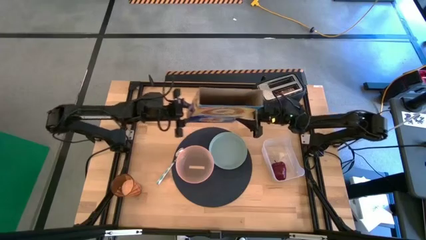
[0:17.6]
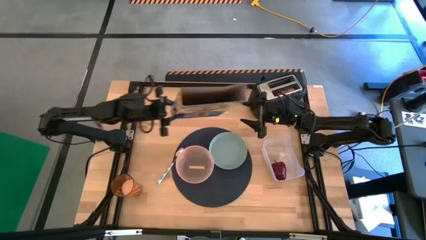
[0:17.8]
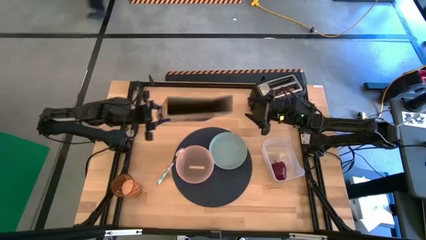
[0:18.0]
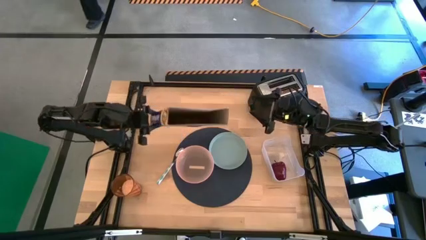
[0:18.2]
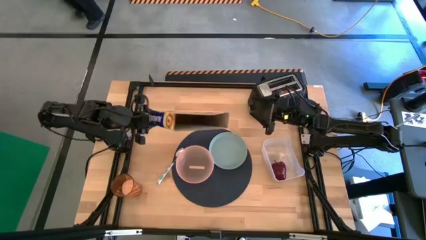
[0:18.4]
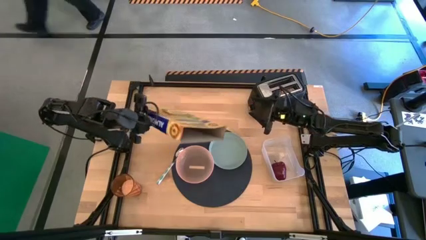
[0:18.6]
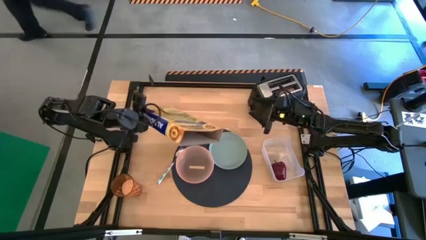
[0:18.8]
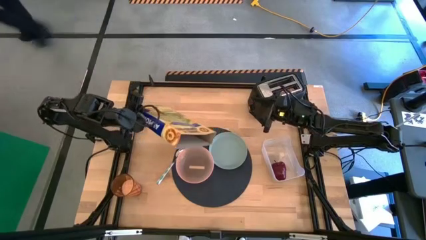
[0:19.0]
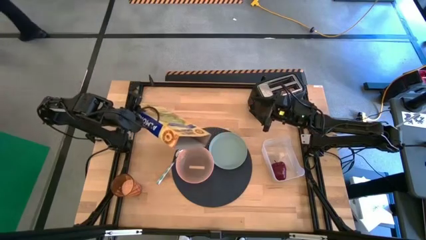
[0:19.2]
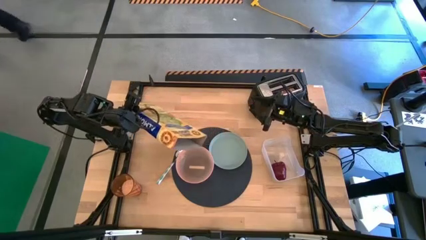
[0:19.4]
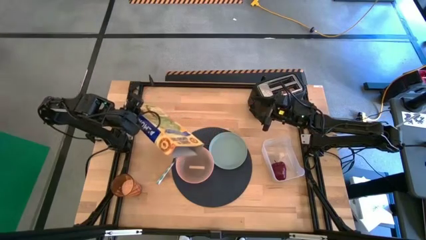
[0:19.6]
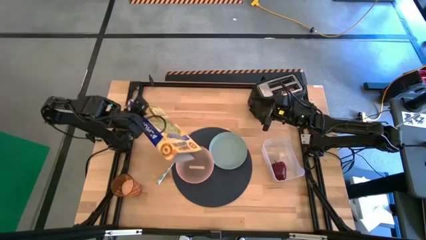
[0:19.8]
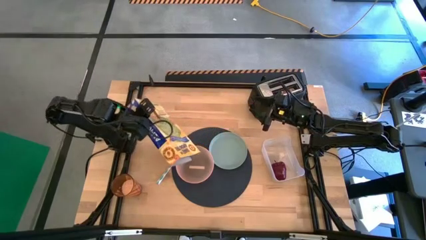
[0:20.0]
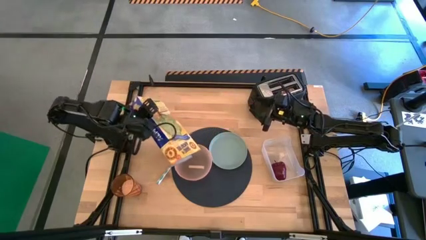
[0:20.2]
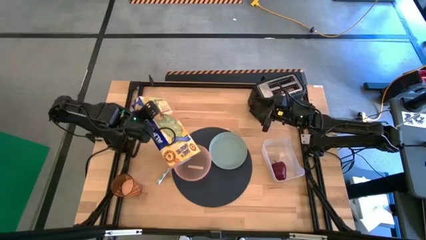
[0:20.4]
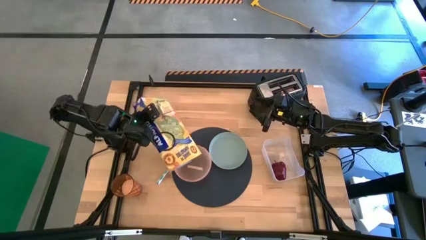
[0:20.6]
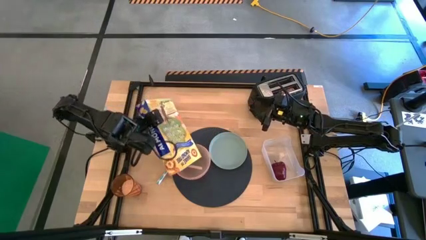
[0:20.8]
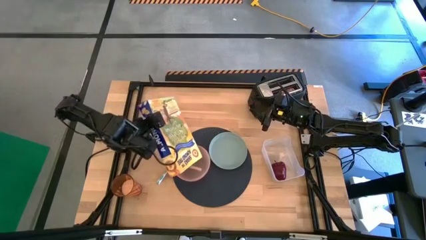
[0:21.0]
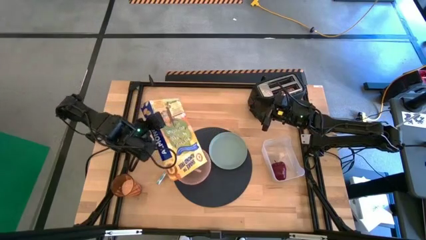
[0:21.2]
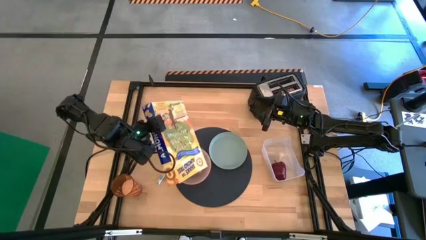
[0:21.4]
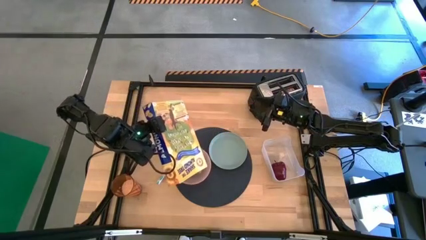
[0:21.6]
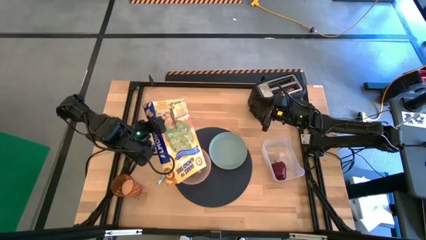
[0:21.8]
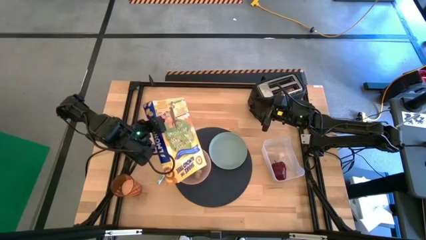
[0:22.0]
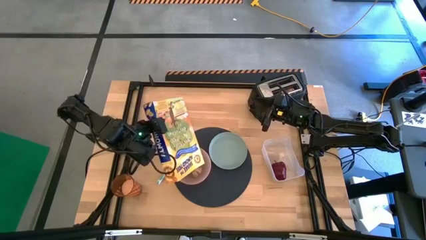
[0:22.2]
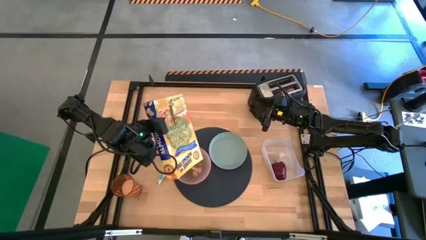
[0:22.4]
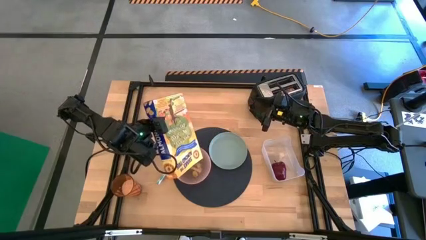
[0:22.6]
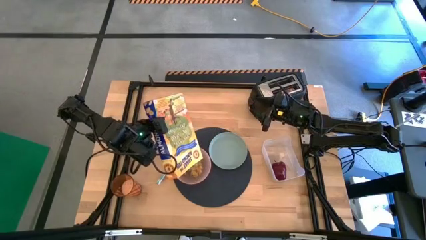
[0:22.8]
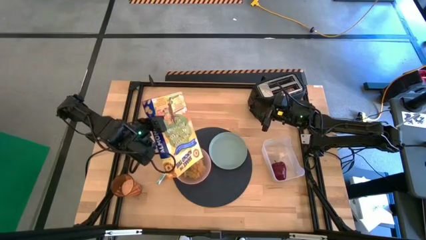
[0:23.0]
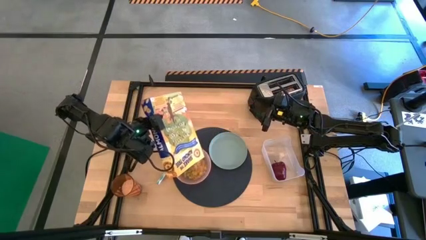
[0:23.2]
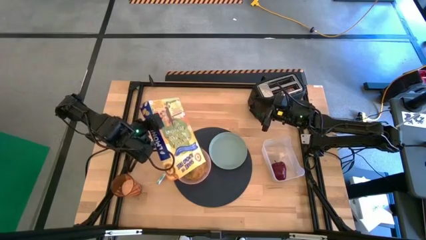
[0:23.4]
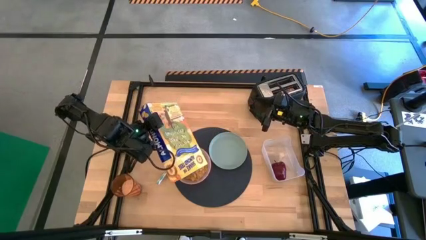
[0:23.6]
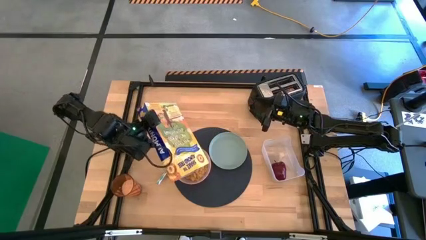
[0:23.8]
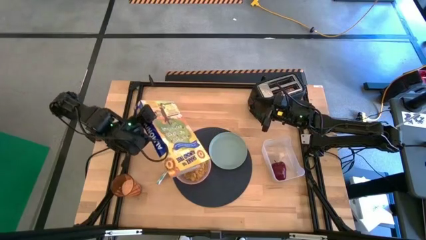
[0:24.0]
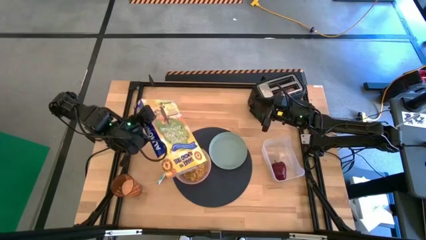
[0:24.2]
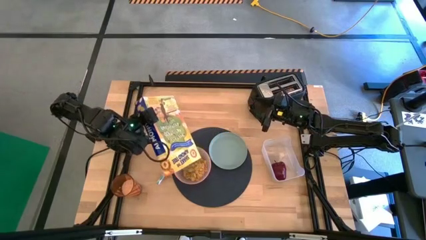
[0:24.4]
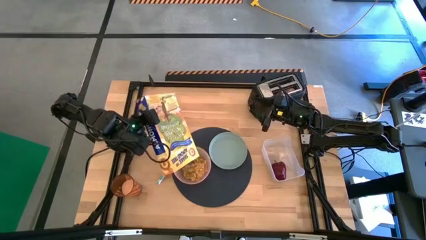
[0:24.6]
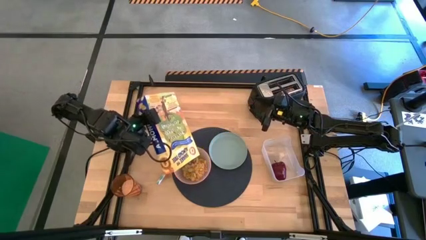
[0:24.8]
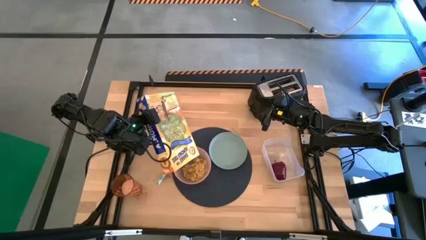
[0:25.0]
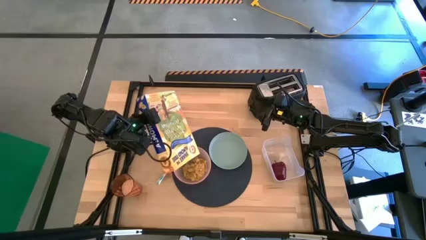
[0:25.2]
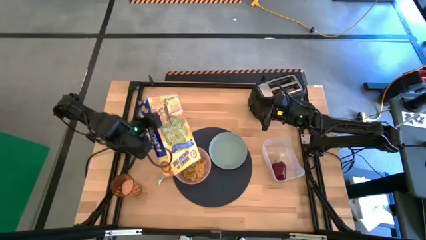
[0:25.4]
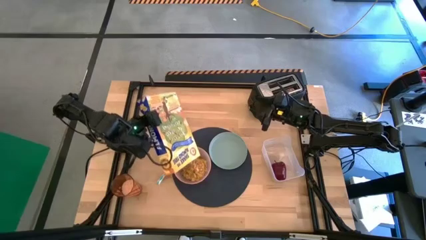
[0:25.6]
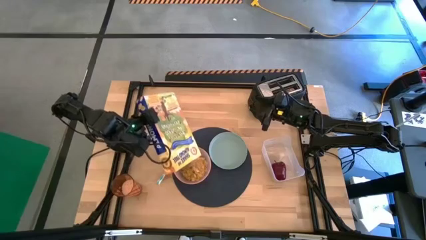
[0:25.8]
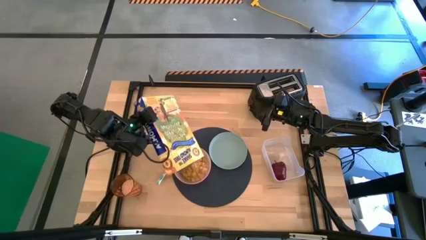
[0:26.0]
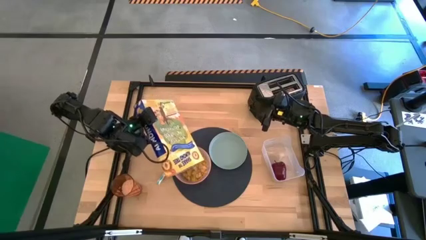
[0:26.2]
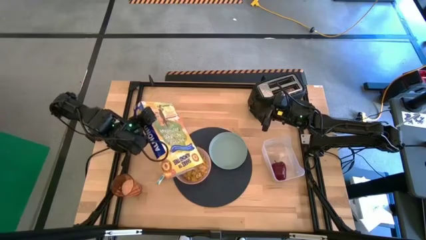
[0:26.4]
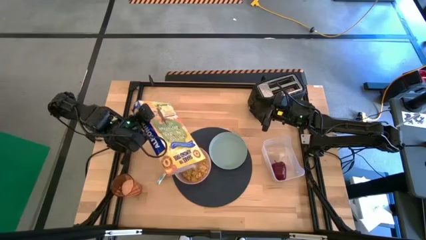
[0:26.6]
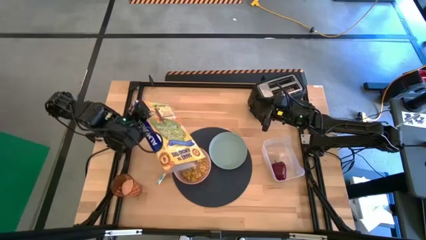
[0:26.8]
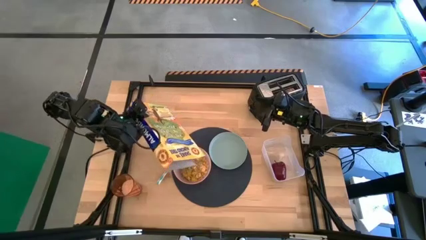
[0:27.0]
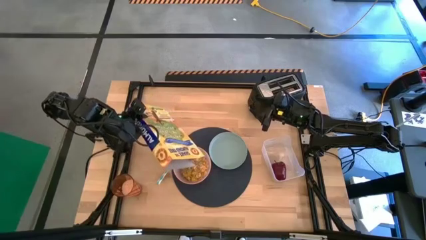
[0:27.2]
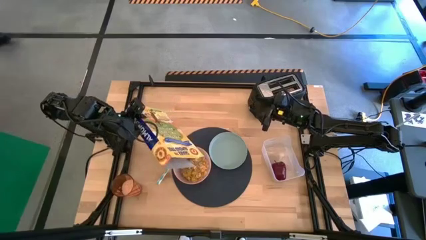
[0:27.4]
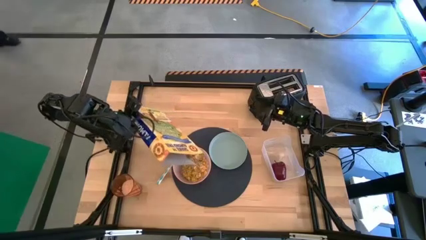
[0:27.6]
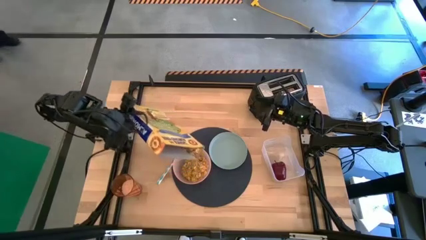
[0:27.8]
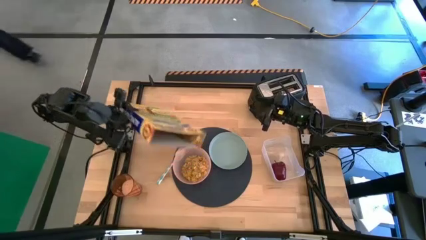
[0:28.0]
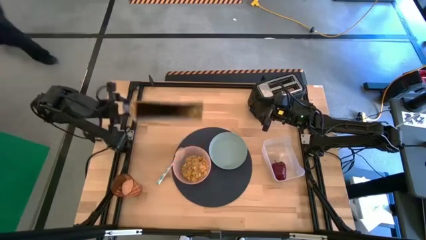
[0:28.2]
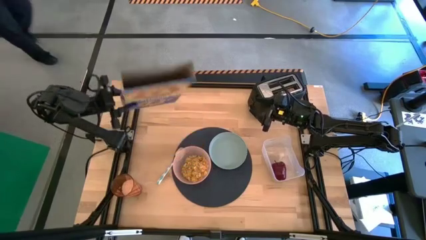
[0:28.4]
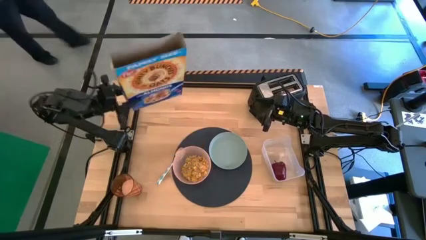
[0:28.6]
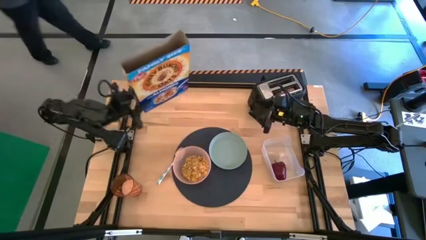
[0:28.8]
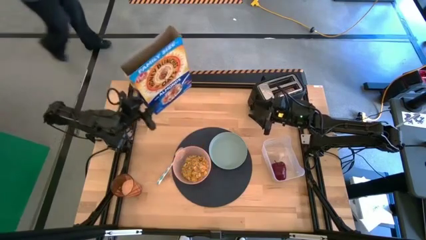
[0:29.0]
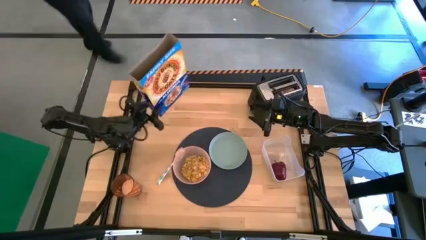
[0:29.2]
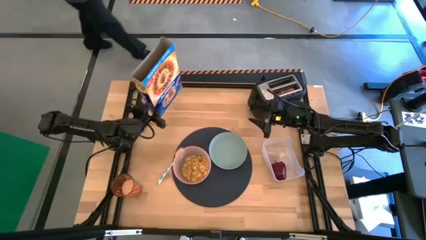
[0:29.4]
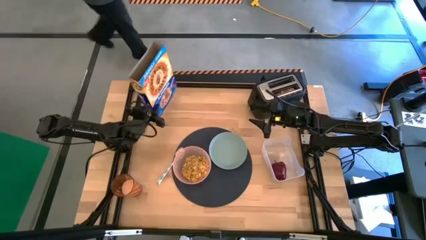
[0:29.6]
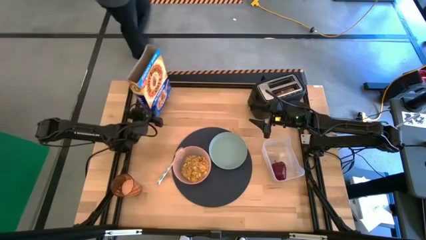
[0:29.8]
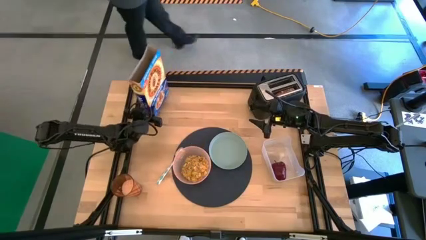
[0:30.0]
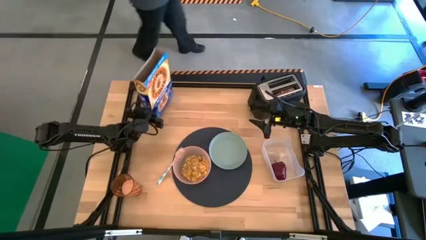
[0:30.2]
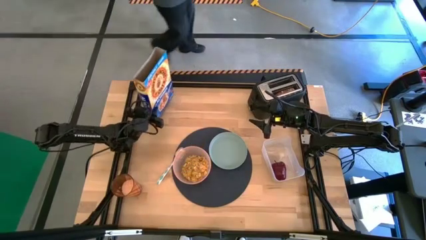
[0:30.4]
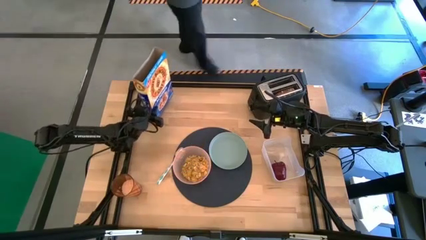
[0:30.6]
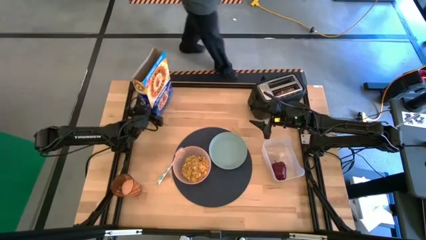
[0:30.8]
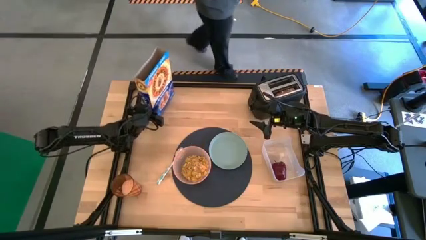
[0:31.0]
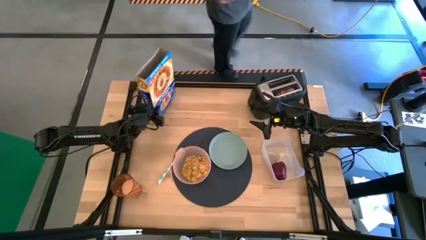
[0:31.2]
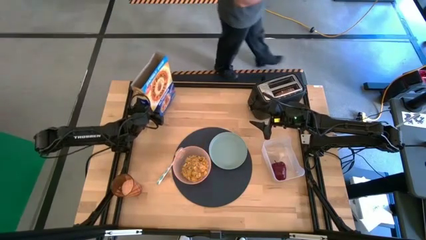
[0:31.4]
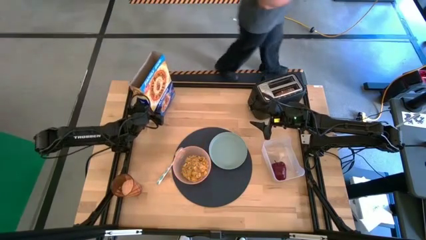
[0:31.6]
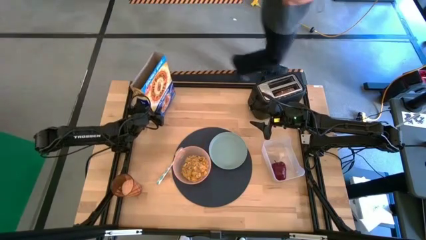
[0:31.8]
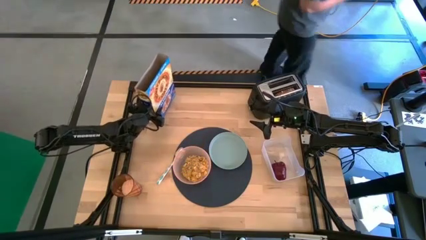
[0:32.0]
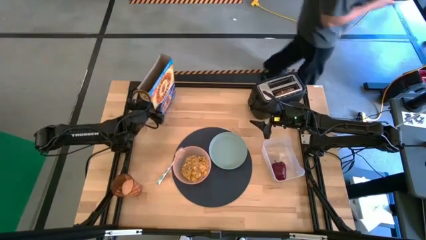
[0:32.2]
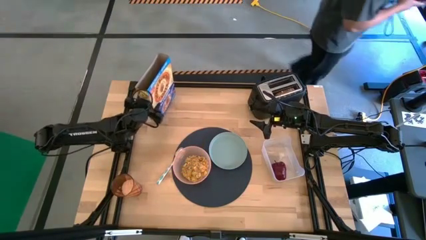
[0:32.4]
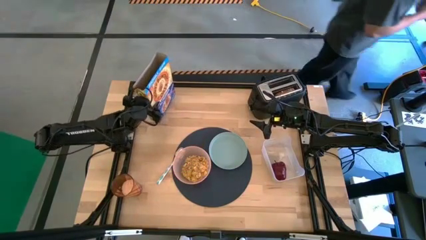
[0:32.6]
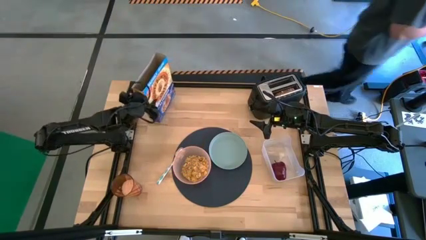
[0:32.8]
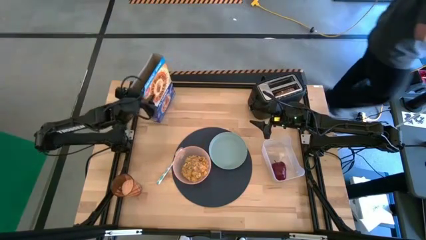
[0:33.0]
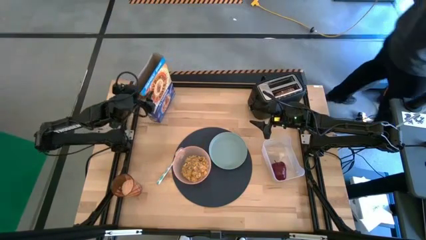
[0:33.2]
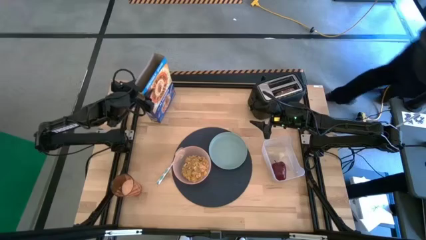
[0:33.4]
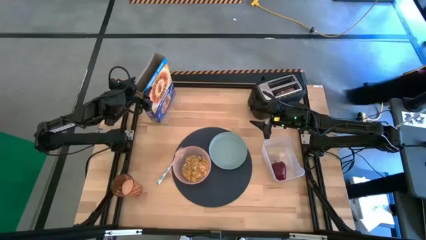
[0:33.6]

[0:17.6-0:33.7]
Task: Arrange a breakfast setting
Pour the cereal from the cereal box into the pink bowl
